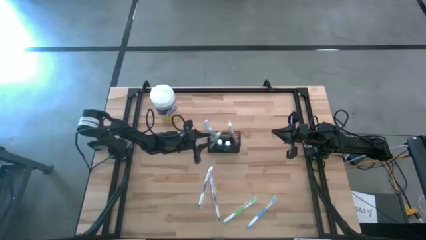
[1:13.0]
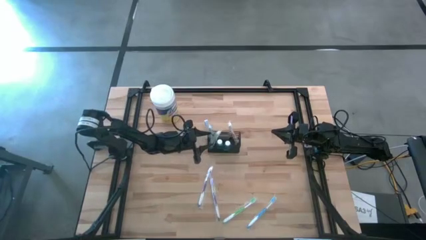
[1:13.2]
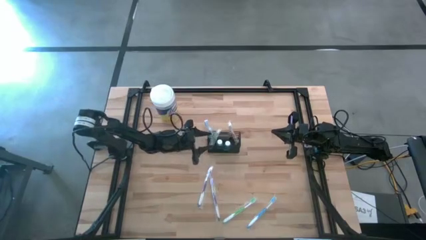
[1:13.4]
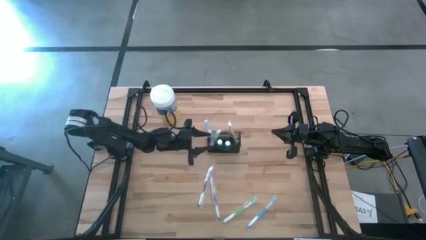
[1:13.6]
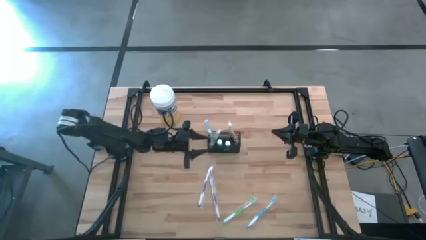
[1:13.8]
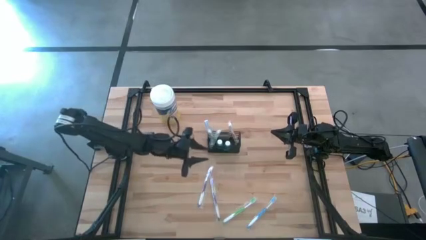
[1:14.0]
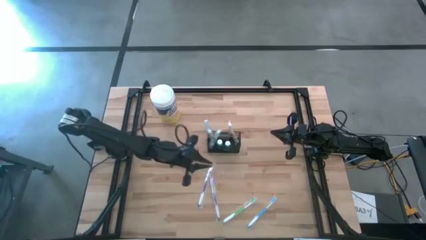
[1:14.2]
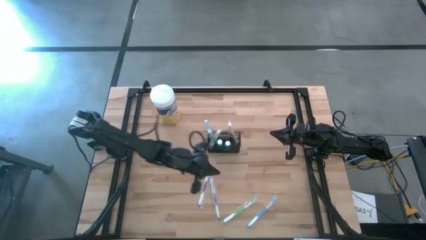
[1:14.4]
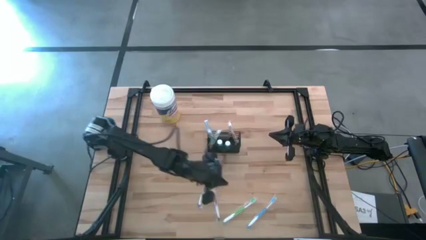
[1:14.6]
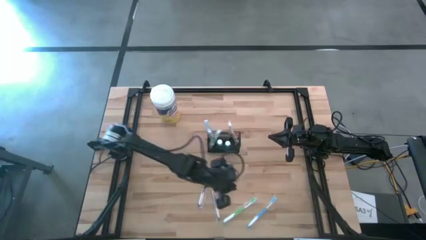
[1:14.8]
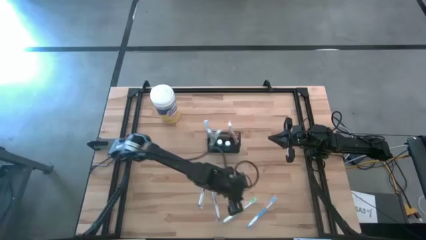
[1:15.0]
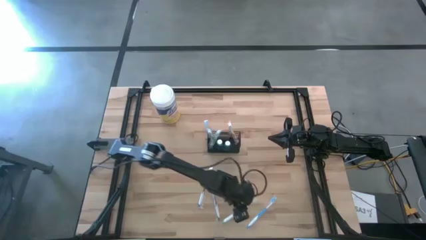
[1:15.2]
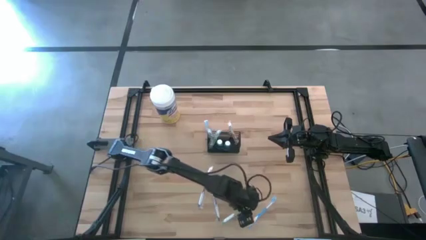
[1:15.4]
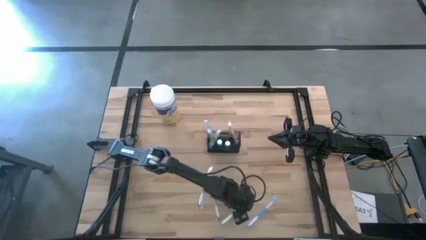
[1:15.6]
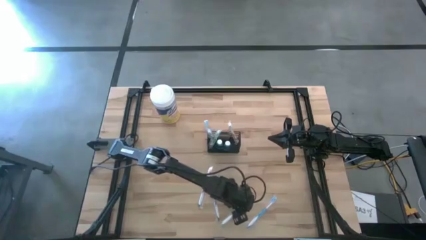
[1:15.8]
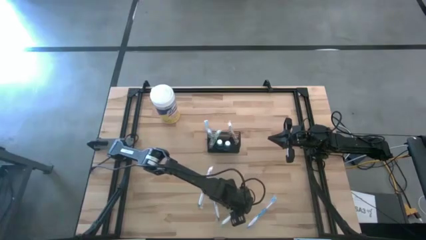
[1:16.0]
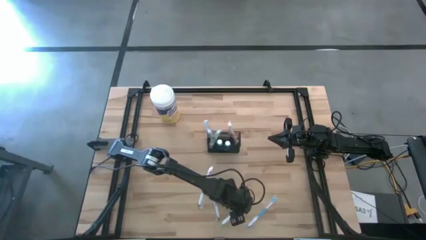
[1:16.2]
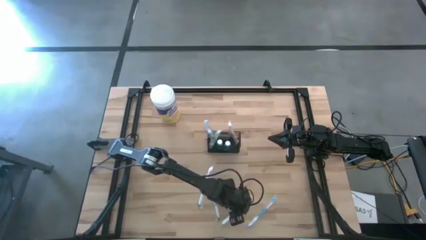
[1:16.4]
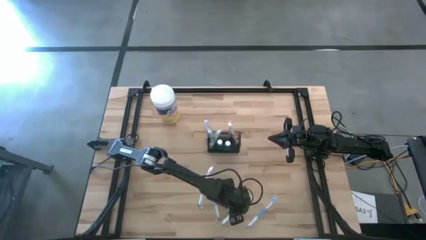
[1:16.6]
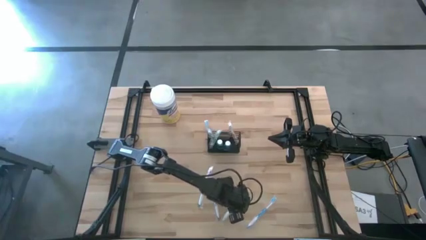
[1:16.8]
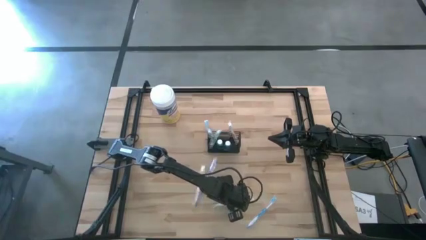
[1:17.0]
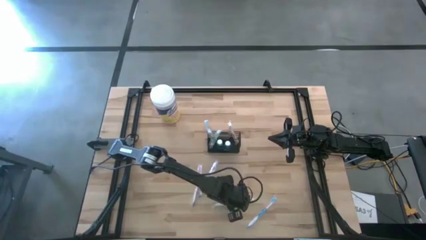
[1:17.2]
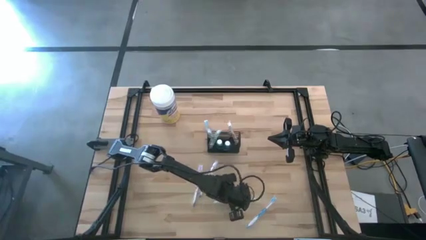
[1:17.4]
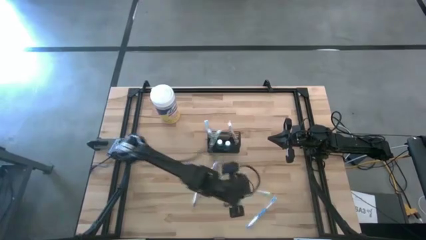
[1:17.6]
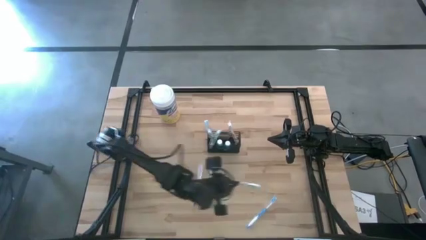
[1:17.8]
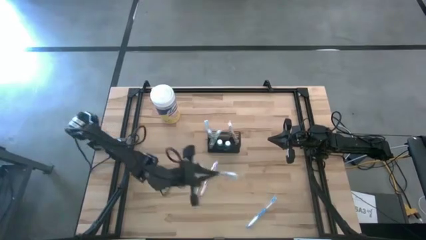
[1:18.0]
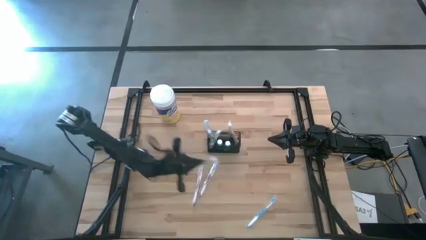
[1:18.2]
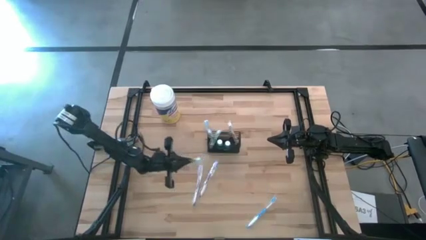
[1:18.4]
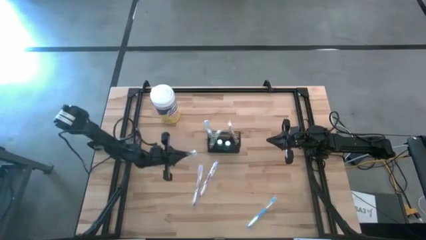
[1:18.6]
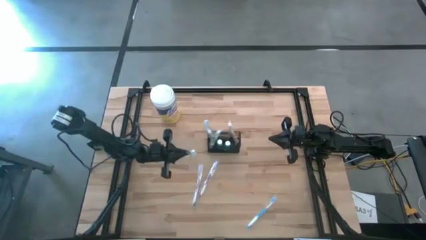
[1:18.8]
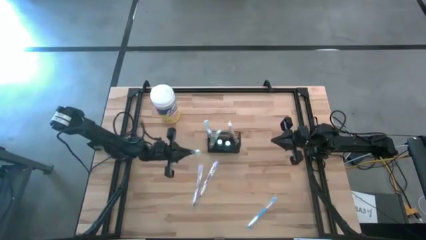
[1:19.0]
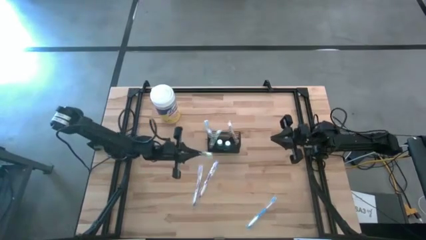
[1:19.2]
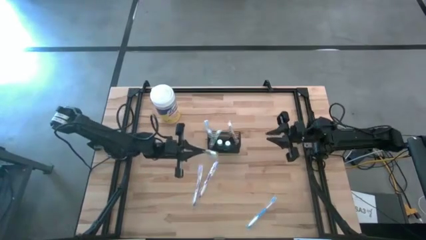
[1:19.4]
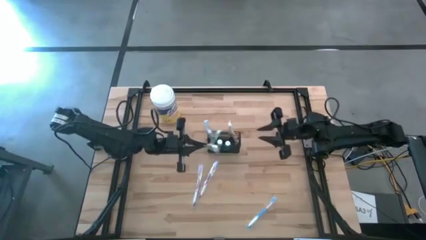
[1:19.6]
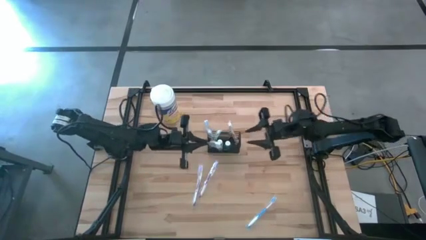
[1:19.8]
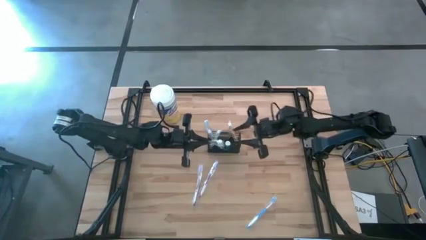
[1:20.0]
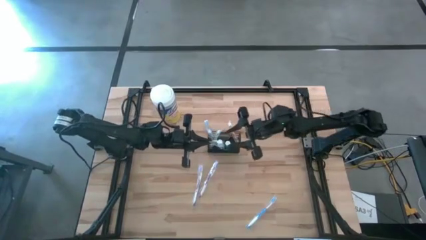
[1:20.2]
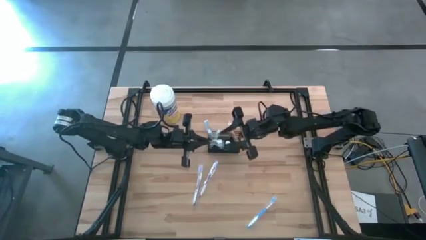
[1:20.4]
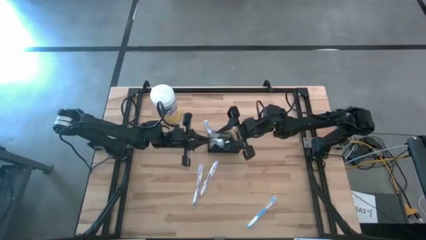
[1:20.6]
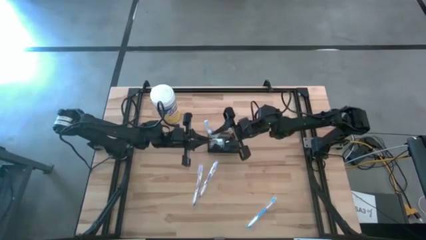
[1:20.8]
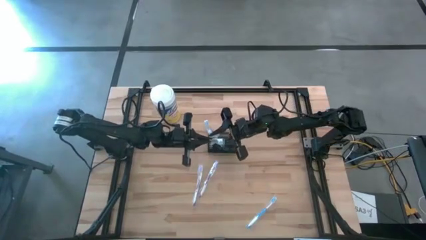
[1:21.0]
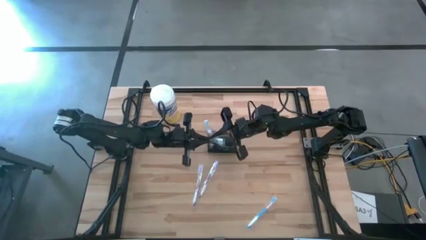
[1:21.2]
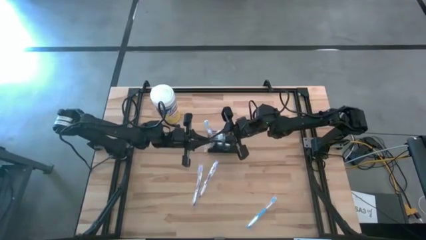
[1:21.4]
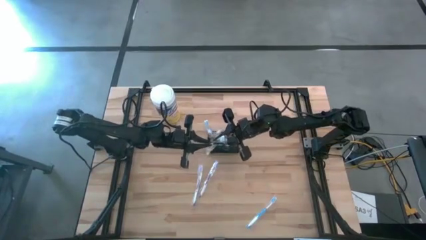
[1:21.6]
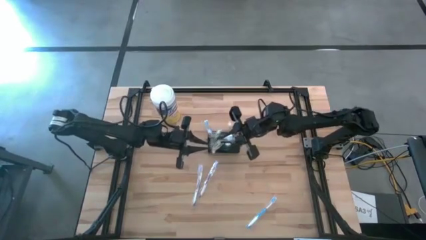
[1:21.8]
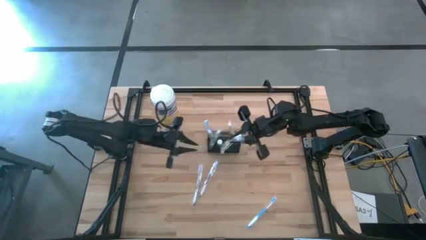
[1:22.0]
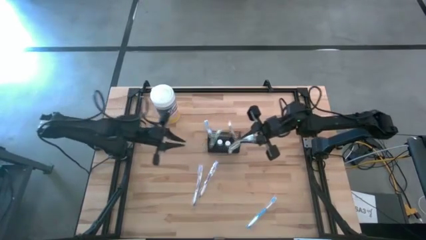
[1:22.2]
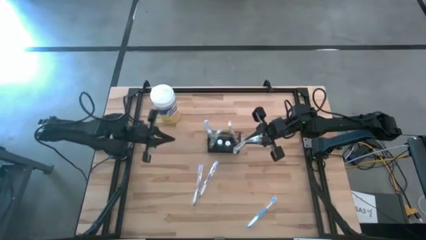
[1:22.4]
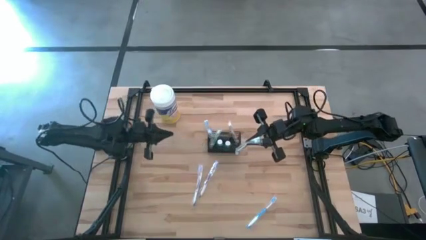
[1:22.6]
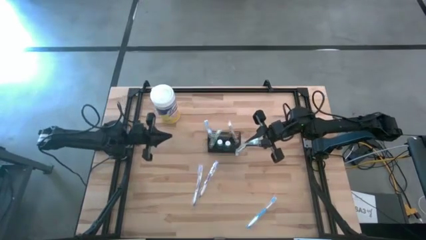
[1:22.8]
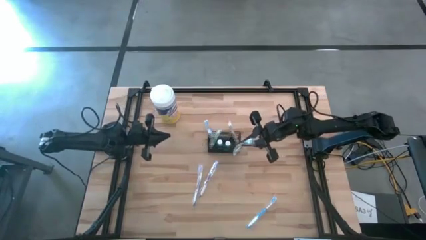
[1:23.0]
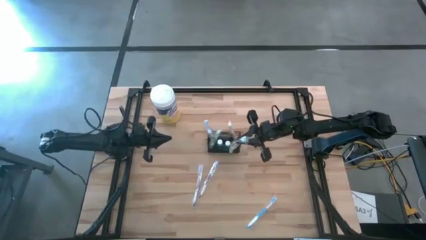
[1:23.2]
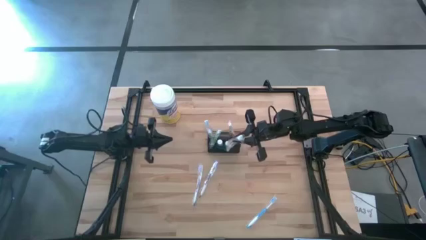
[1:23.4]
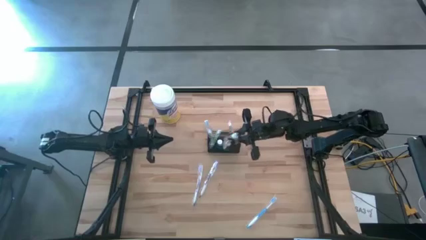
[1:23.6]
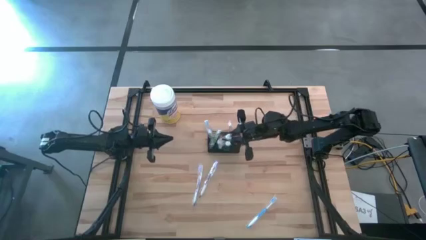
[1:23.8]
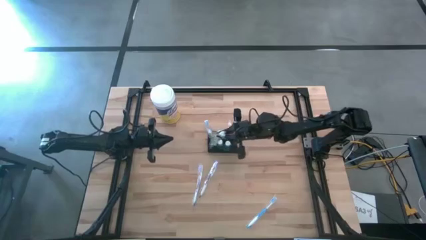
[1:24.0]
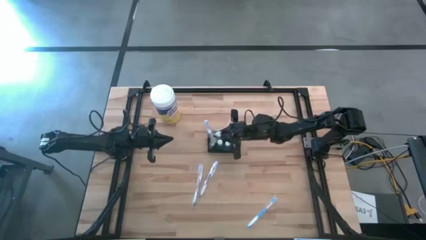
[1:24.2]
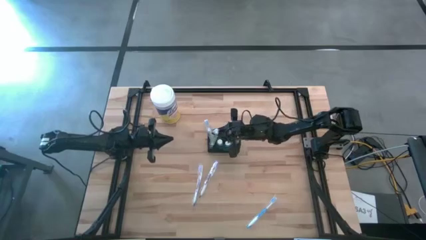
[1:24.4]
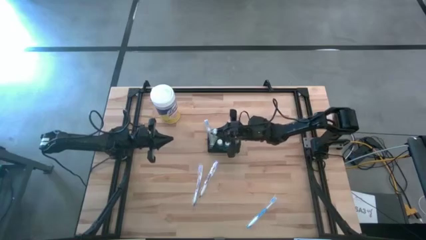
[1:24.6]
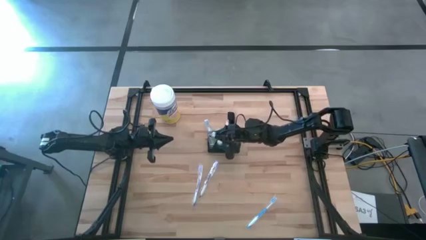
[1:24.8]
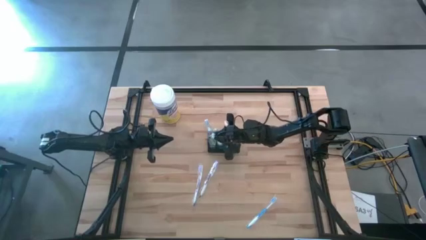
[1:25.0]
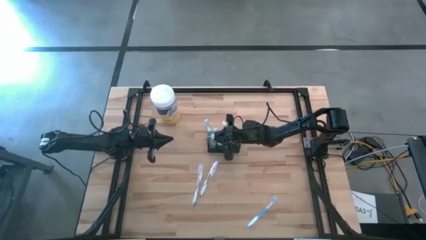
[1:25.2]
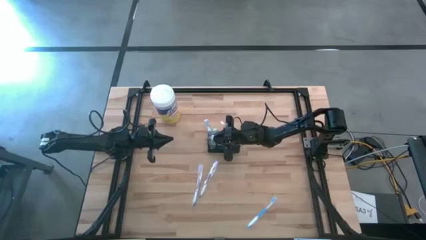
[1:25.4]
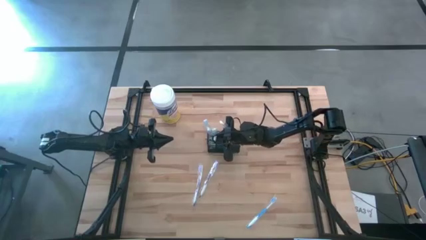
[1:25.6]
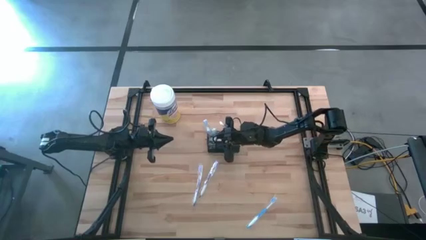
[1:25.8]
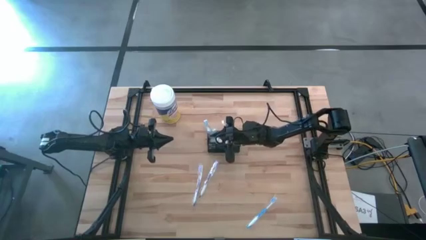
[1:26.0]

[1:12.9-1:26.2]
Task: Pick & Place toothbrushing station
Put the green toothbrush into the black mesh organizer
